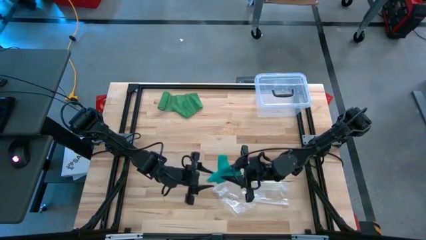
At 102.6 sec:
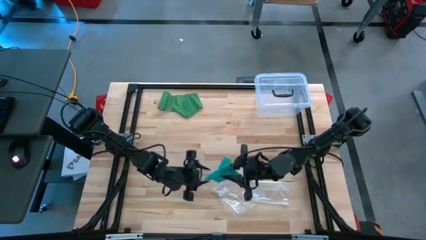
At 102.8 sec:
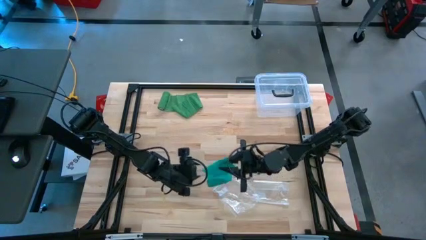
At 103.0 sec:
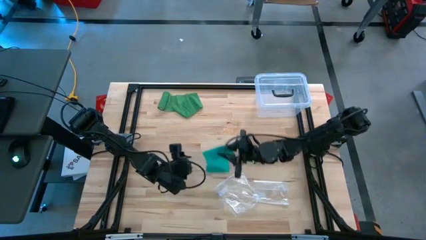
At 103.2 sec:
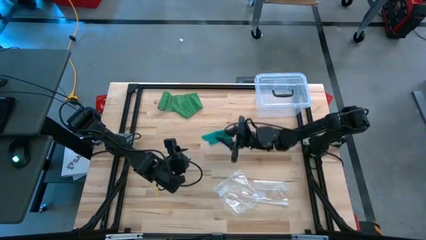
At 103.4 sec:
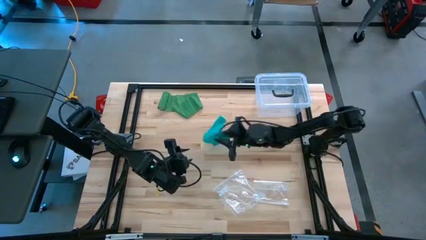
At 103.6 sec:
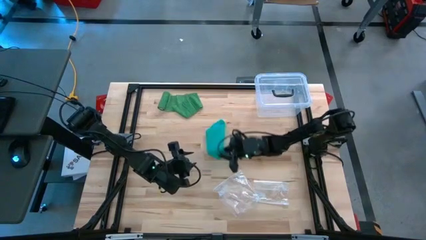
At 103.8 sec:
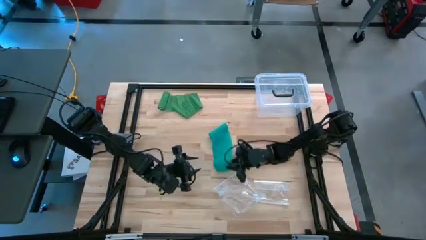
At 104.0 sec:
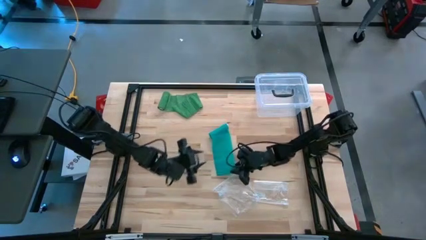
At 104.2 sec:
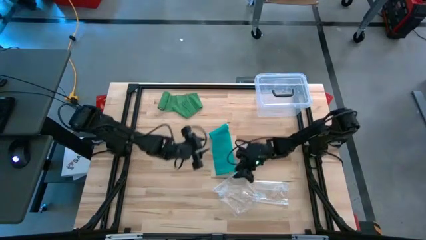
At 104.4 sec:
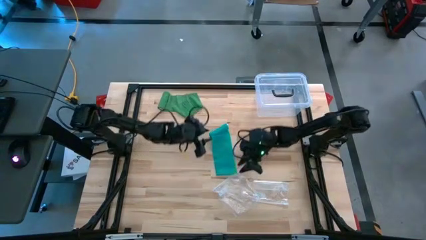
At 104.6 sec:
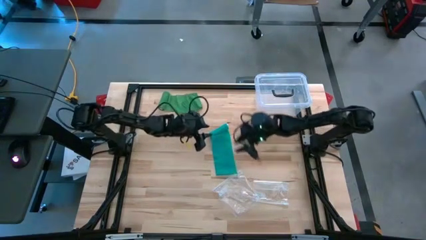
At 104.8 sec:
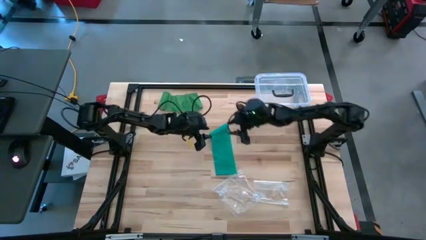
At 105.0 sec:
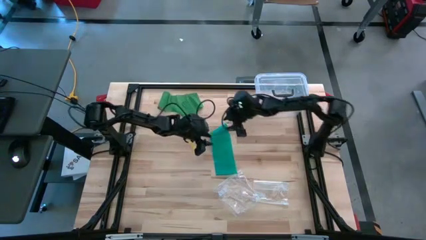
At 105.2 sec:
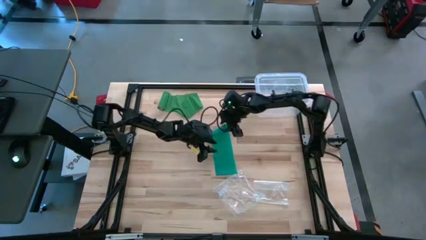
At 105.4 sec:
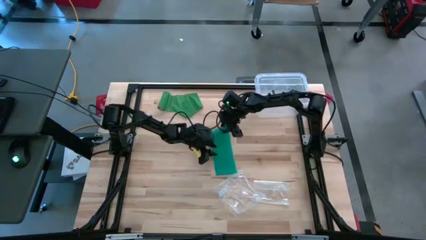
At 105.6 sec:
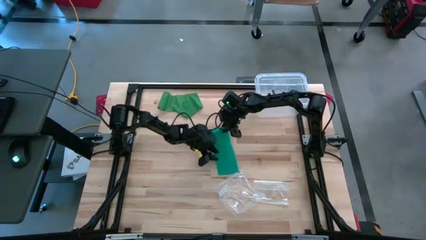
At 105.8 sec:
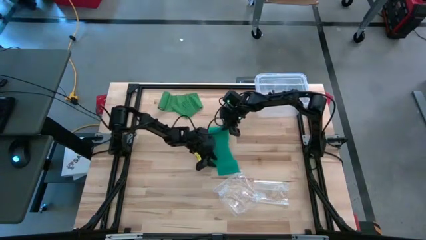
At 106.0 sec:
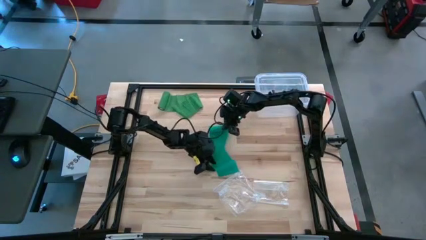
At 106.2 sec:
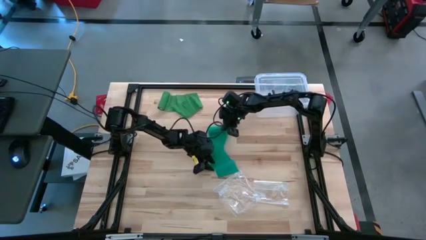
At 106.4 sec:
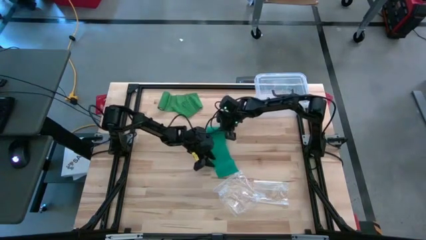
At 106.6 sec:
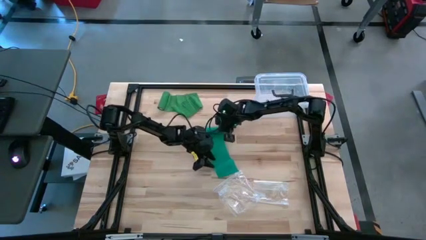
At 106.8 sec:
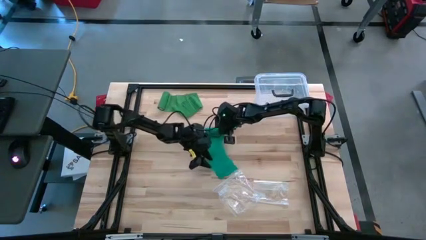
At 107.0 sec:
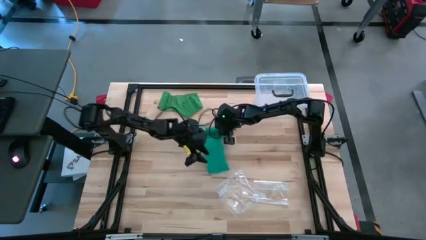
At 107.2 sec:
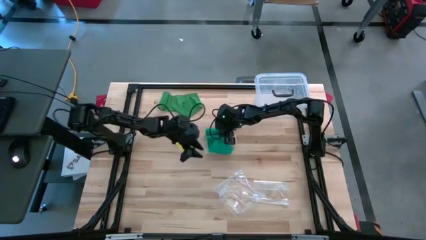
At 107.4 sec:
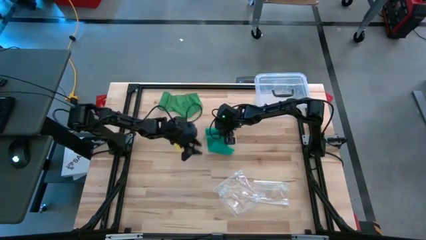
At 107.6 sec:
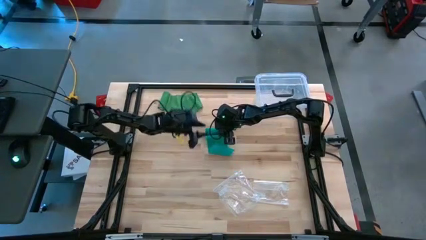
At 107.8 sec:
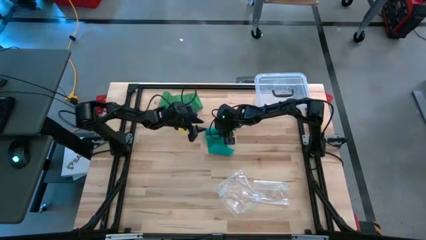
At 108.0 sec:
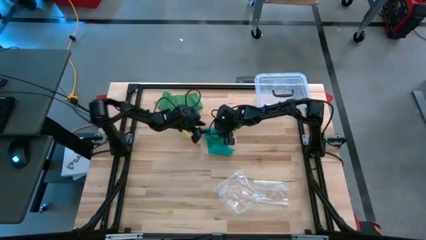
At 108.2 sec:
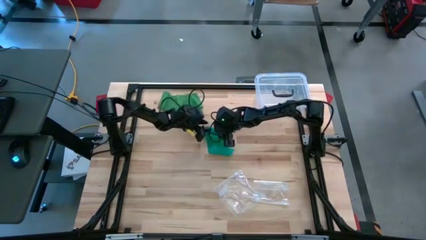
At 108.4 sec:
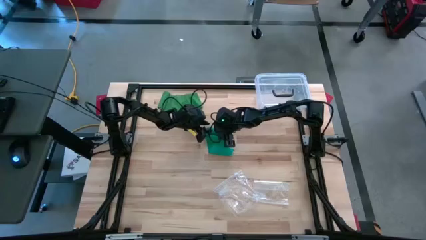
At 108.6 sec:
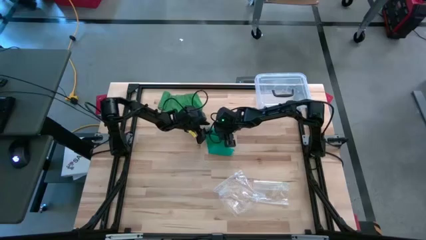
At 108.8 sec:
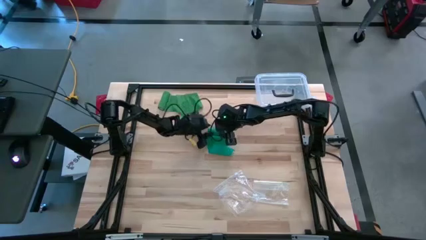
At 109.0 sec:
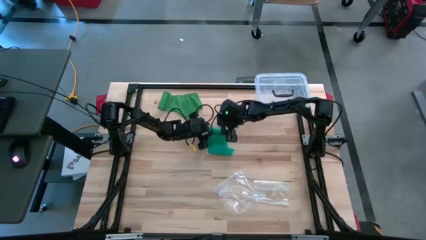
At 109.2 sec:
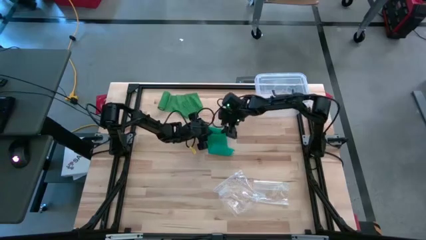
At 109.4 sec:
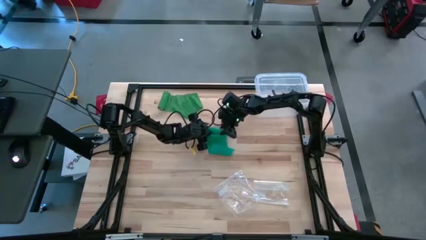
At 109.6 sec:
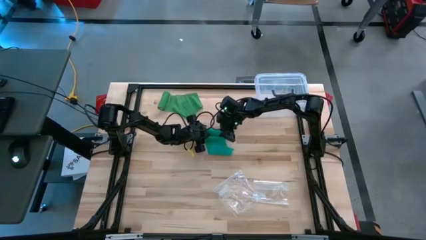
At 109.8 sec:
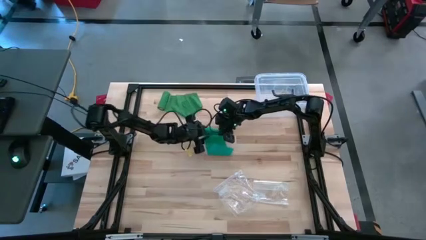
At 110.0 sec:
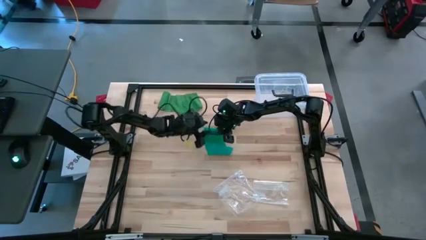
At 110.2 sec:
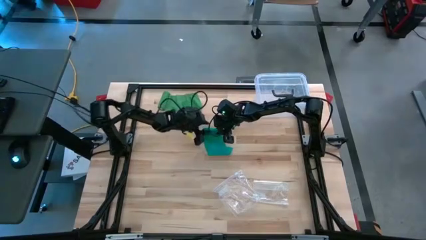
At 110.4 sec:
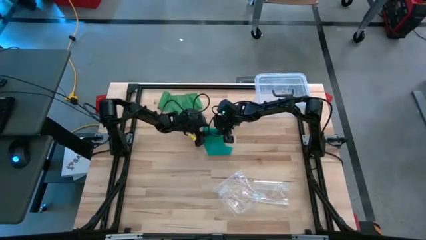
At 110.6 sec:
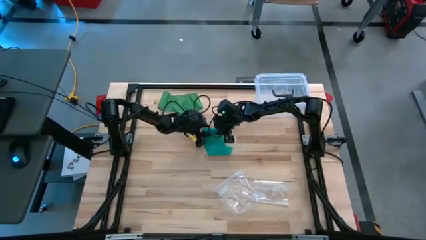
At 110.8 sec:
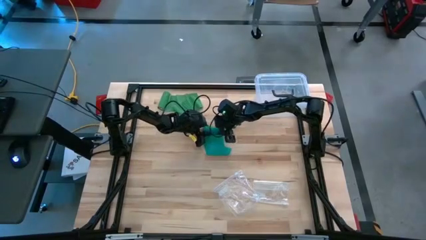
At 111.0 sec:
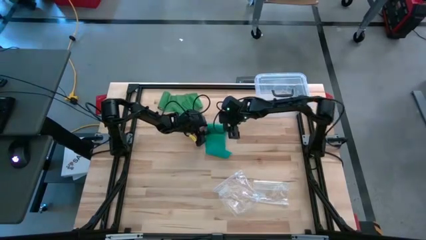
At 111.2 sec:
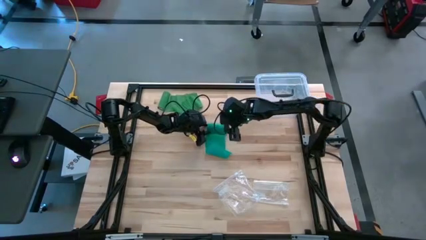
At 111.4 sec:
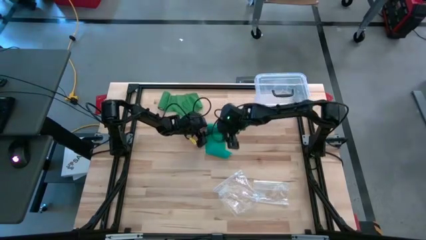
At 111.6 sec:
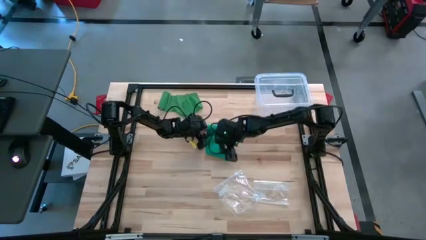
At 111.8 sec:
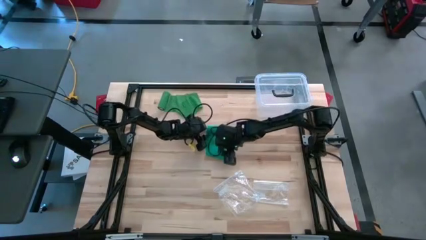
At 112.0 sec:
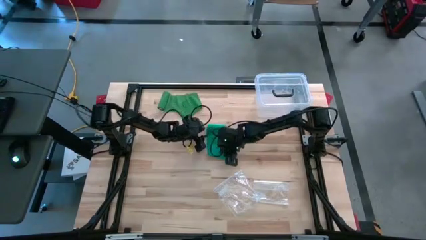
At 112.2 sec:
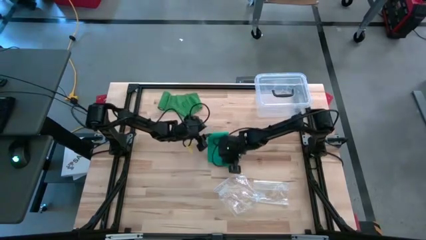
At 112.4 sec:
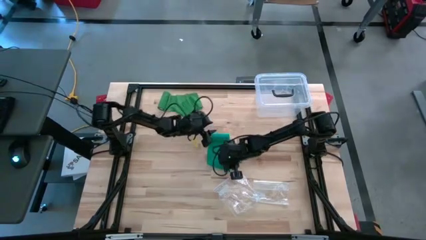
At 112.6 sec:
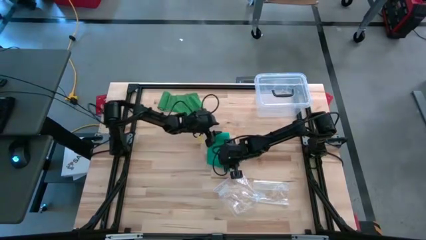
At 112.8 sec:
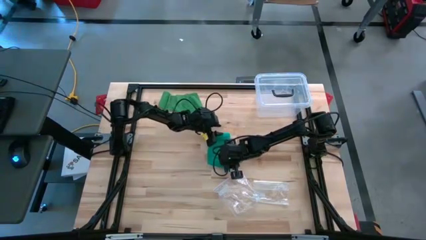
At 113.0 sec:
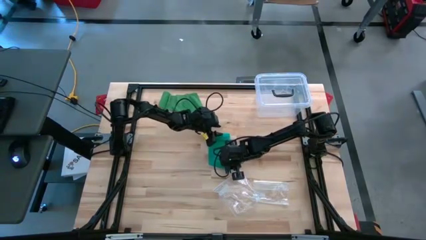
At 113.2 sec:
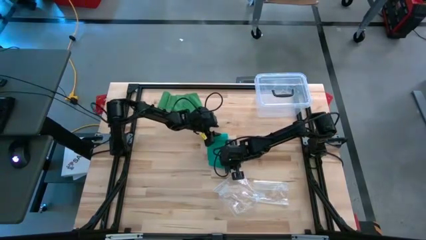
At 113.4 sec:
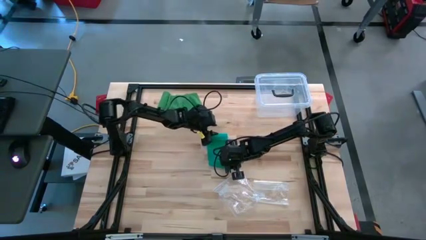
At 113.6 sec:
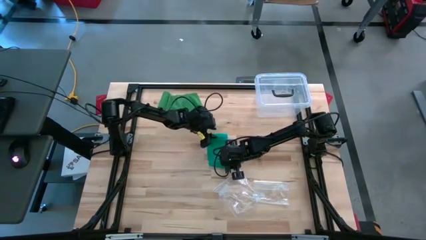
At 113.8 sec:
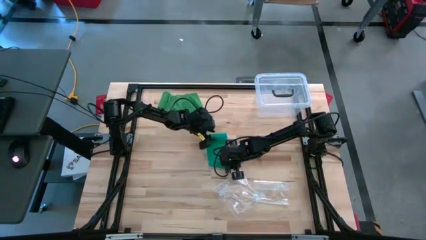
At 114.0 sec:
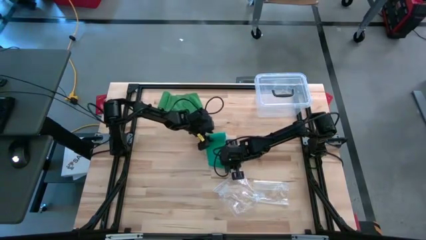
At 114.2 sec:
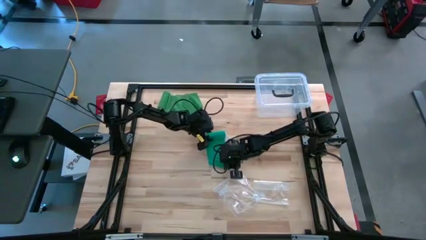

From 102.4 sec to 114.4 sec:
Task: Roll bandage
Roll the blue bandage

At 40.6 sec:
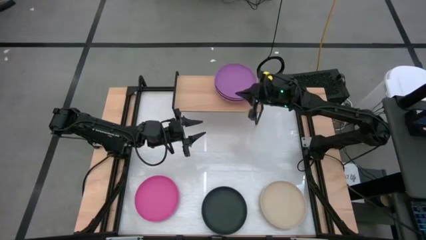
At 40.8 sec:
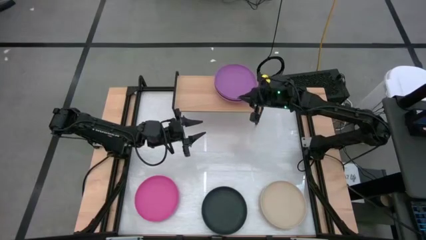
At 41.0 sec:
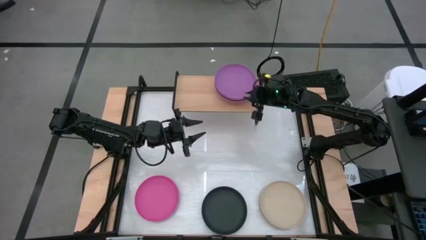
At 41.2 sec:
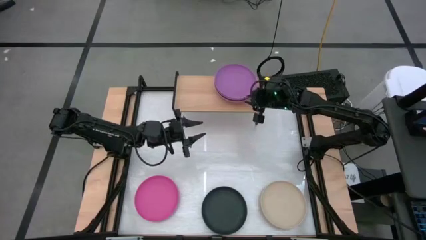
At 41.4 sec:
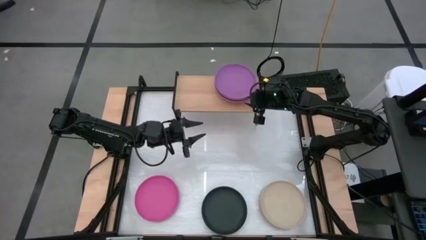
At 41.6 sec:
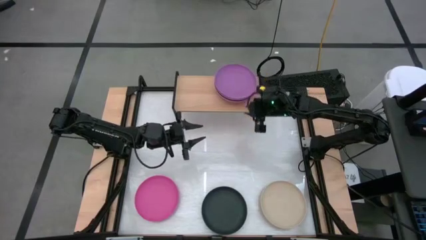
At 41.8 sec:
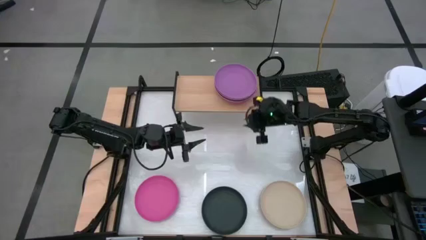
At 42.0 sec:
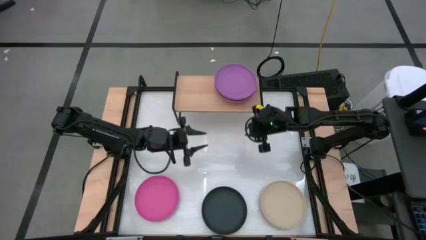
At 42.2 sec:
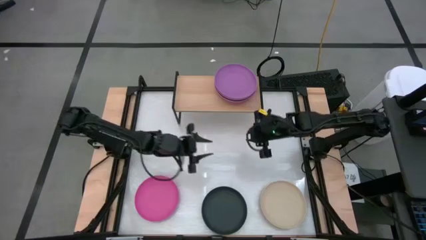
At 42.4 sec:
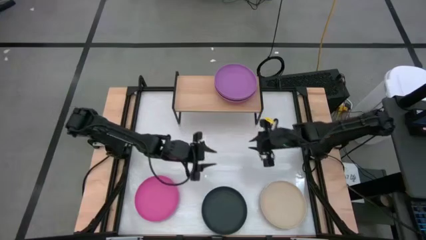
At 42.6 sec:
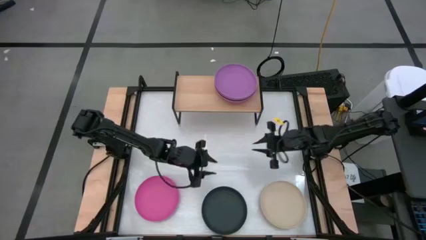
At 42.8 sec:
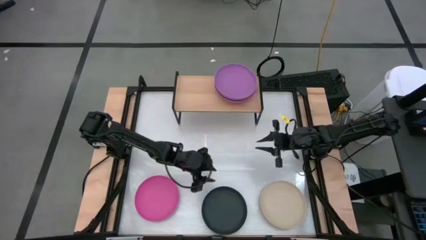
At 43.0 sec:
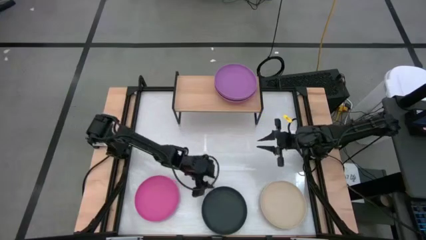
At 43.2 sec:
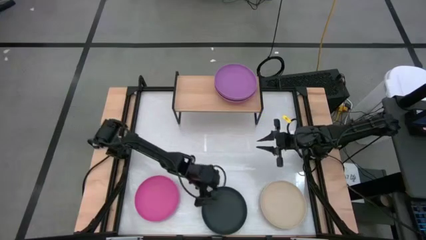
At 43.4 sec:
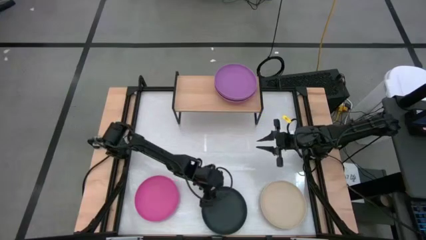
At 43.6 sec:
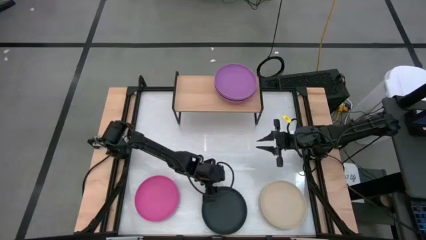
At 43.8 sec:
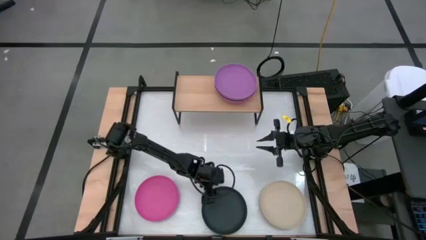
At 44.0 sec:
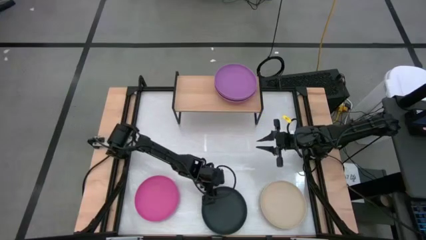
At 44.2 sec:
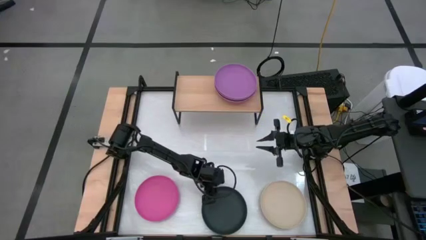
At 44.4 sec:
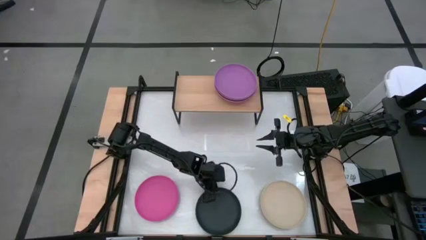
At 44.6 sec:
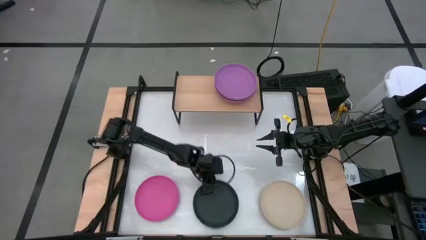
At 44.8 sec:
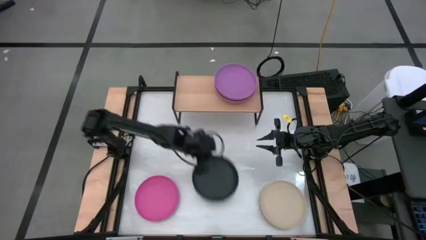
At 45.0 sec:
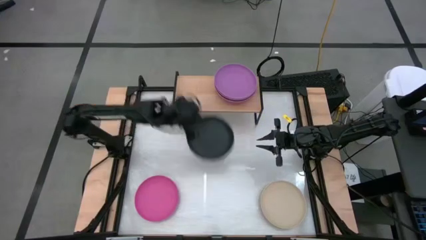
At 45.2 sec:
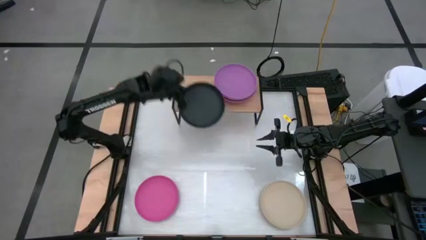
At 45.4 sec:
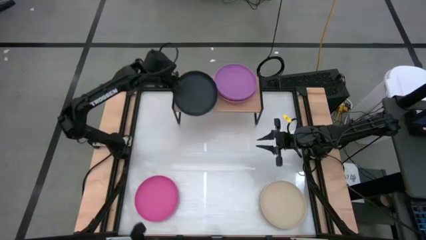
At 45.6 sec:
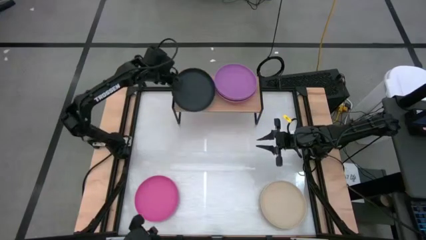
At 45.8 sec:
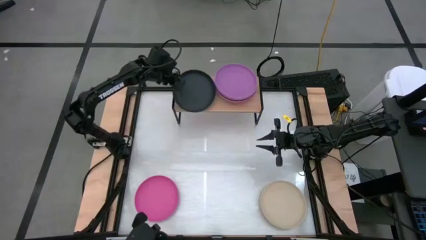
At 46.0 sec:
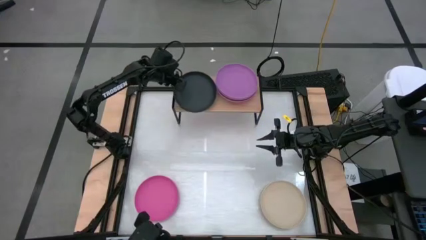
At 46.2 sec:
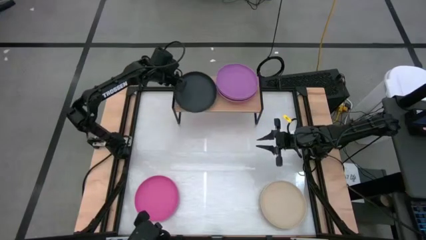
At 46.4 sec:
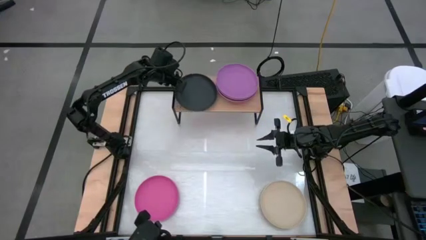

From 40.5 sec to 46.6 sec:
Task: Place and stack plates onto a shelf
Put the black plate on the shelf
